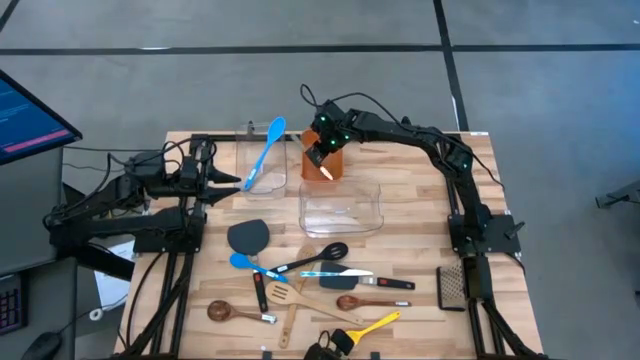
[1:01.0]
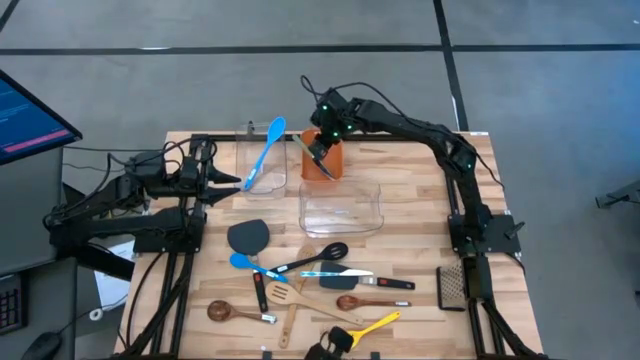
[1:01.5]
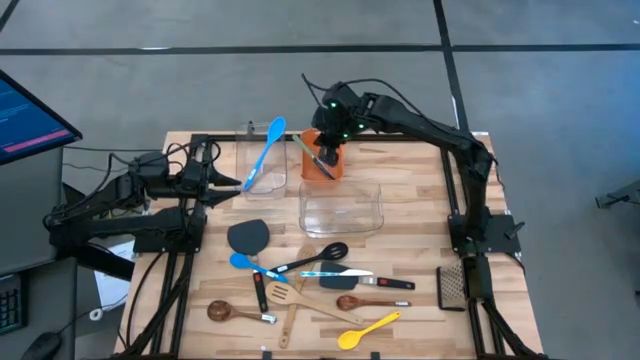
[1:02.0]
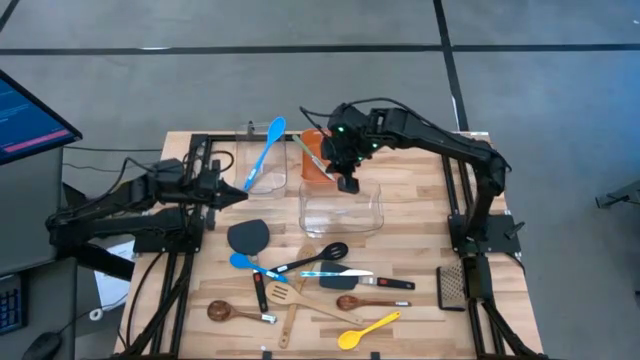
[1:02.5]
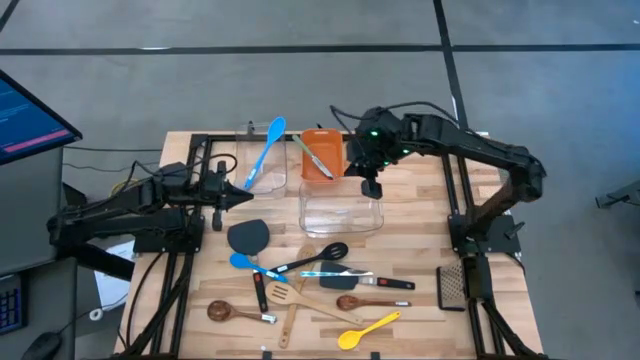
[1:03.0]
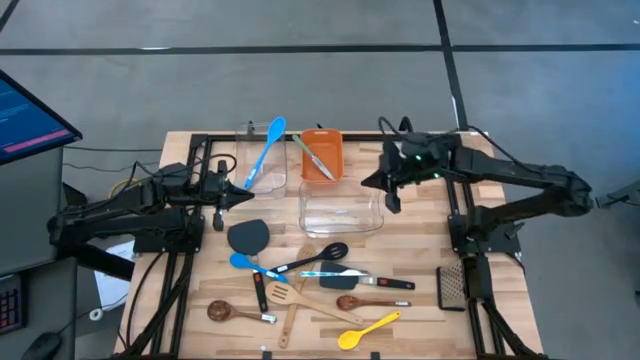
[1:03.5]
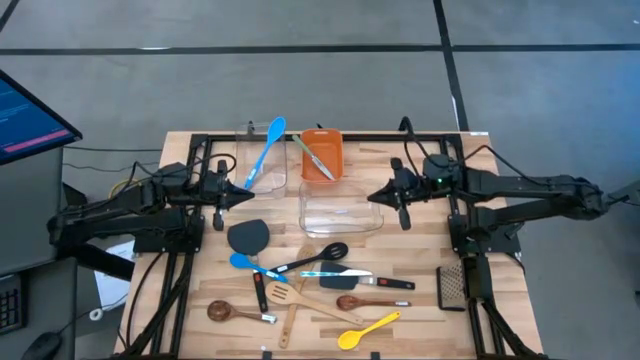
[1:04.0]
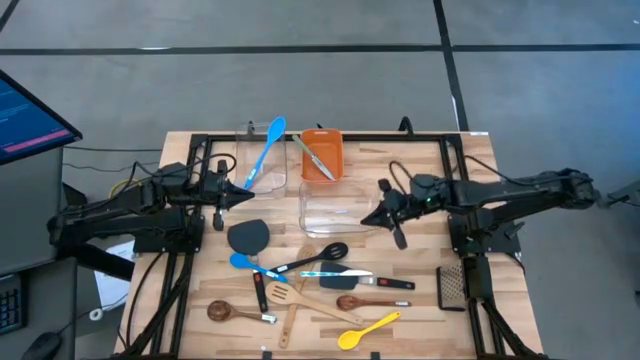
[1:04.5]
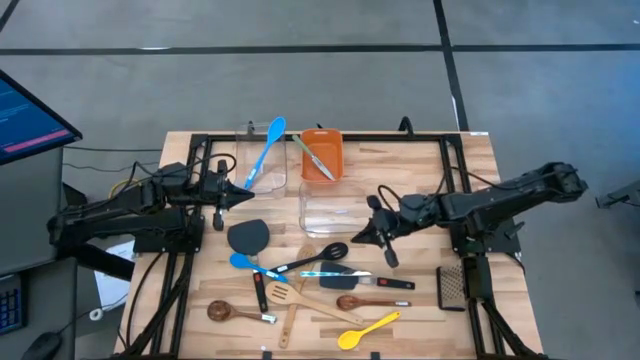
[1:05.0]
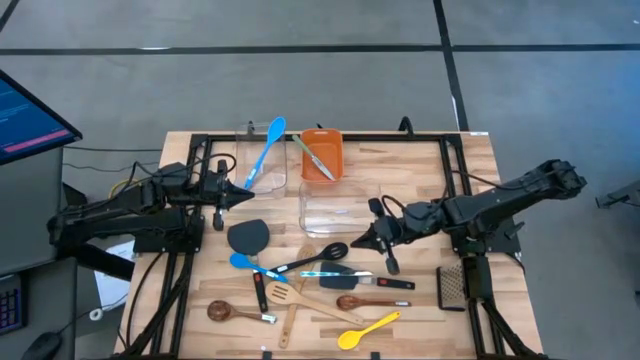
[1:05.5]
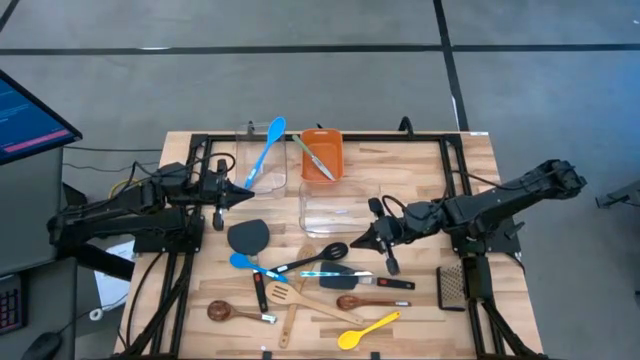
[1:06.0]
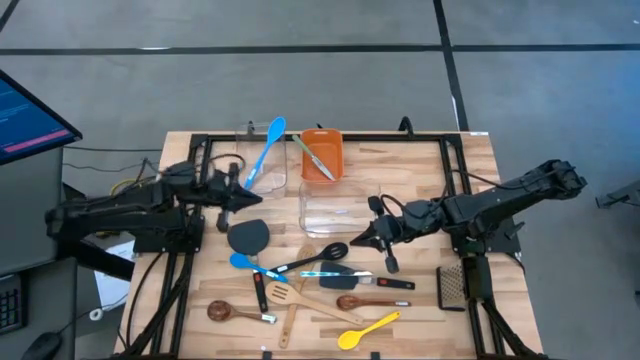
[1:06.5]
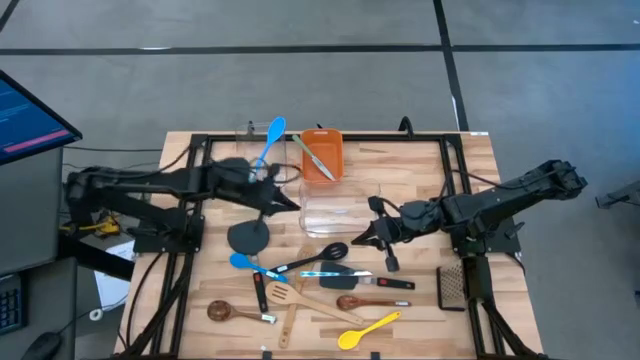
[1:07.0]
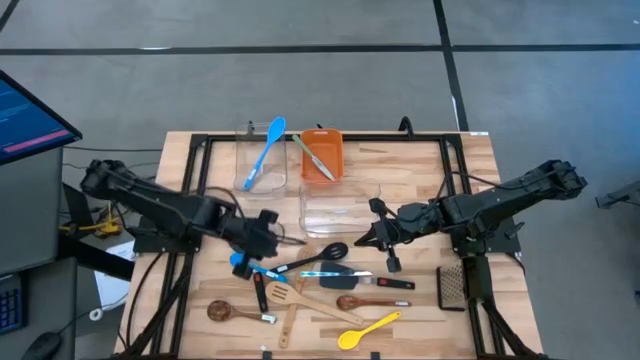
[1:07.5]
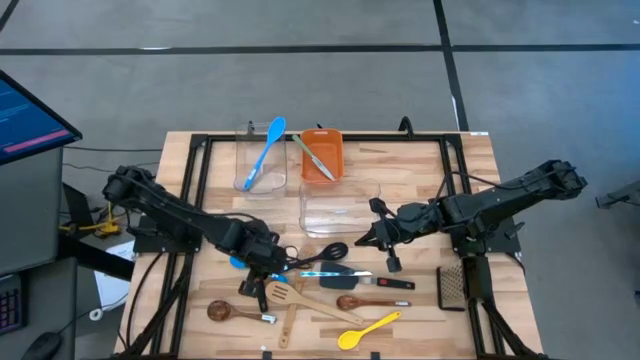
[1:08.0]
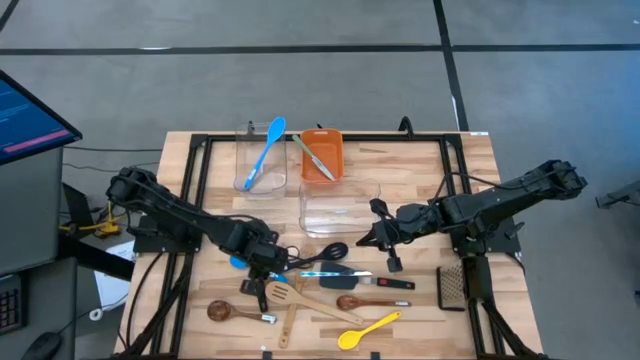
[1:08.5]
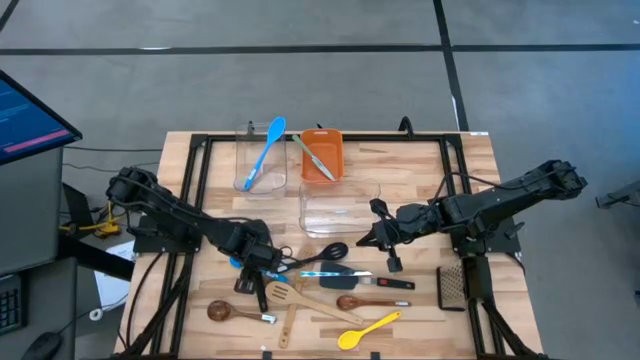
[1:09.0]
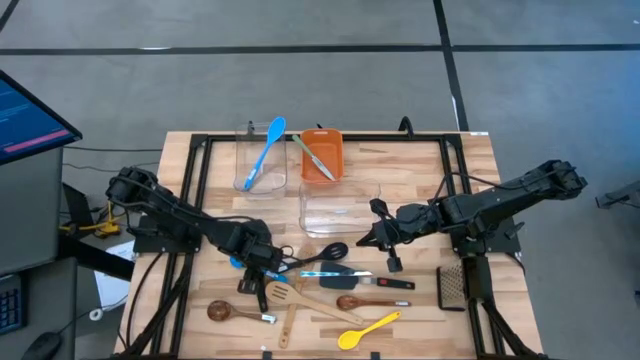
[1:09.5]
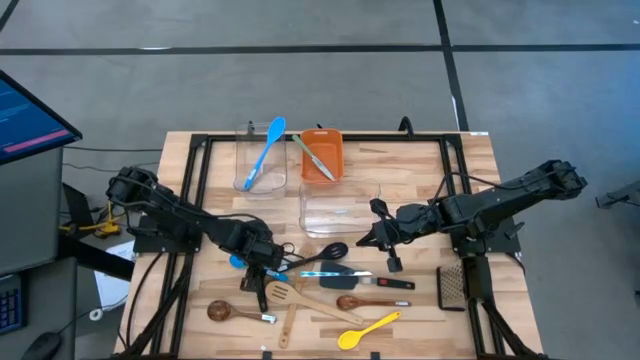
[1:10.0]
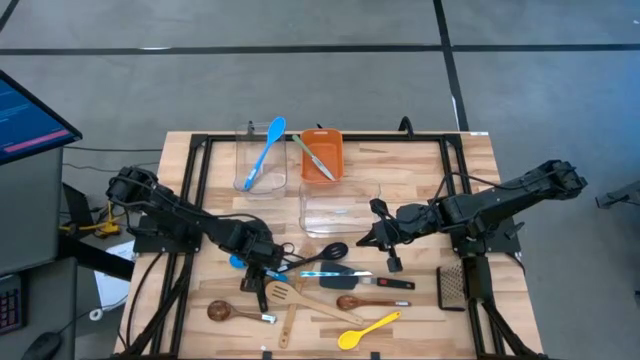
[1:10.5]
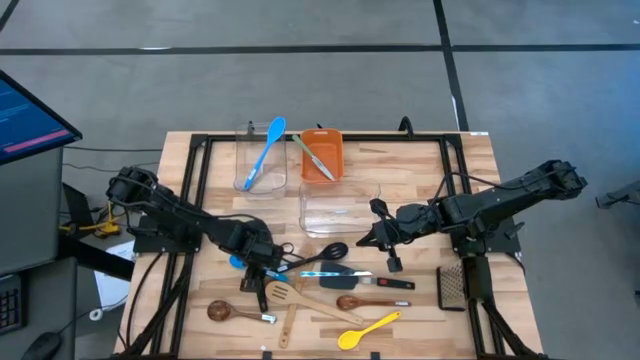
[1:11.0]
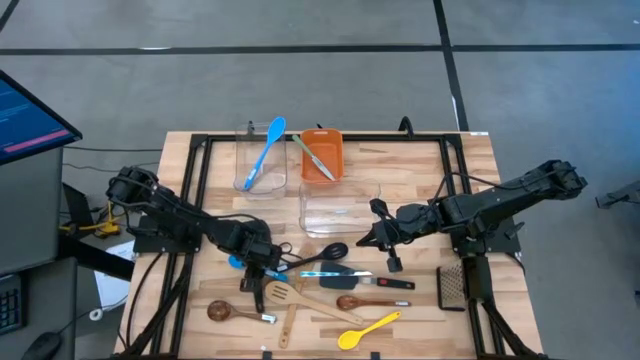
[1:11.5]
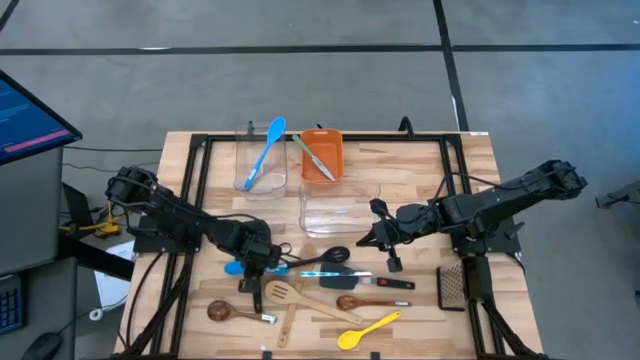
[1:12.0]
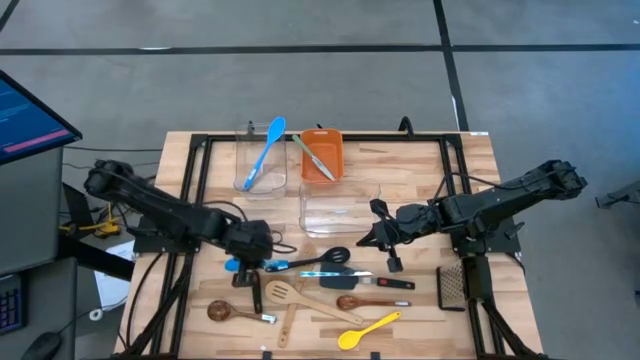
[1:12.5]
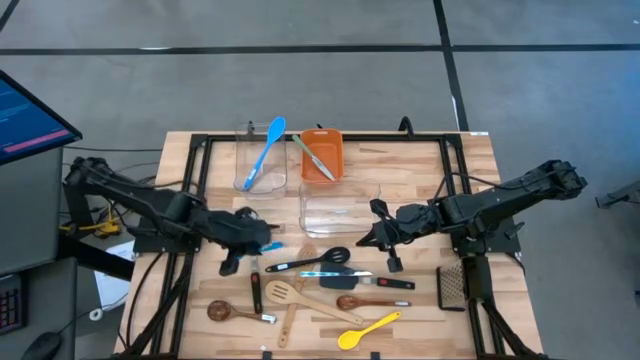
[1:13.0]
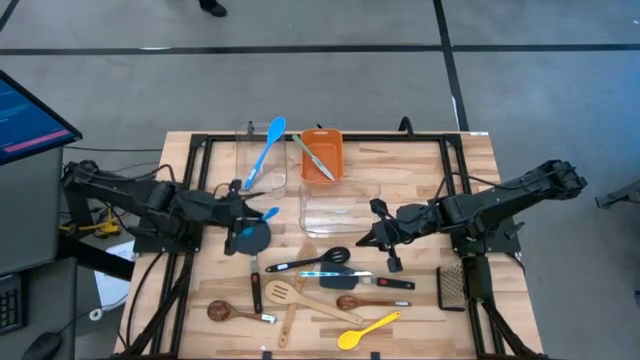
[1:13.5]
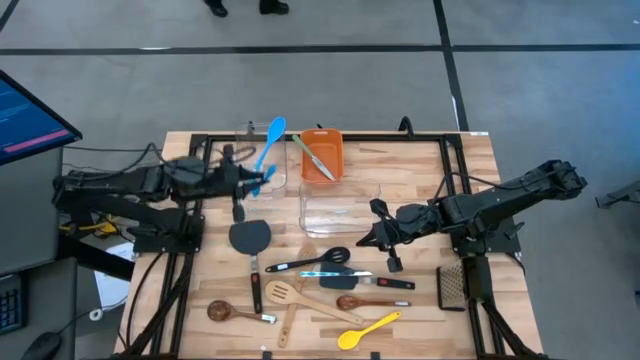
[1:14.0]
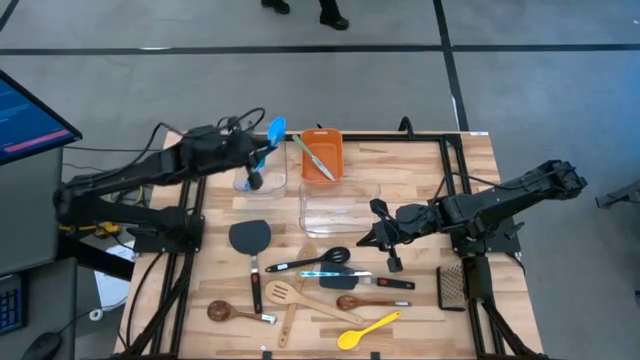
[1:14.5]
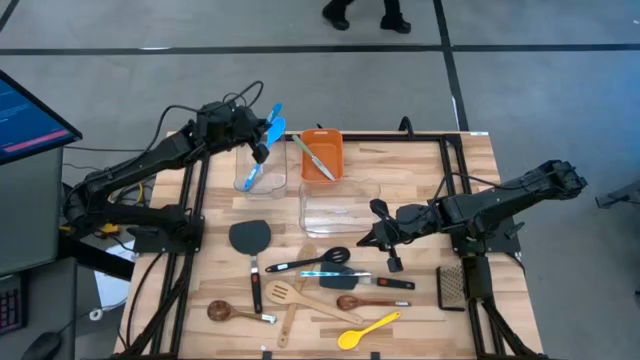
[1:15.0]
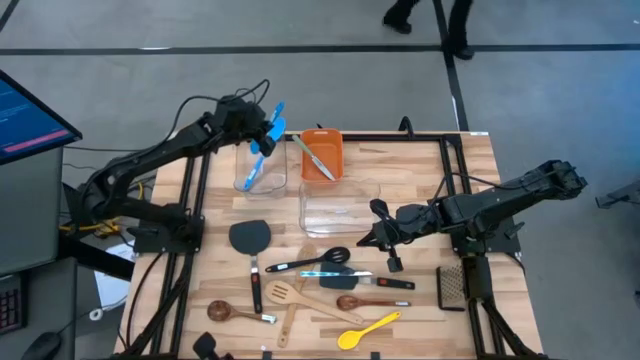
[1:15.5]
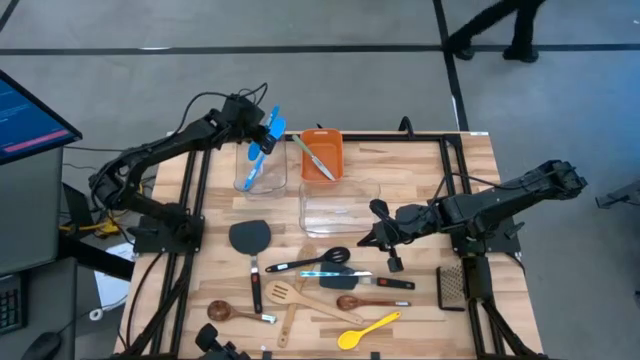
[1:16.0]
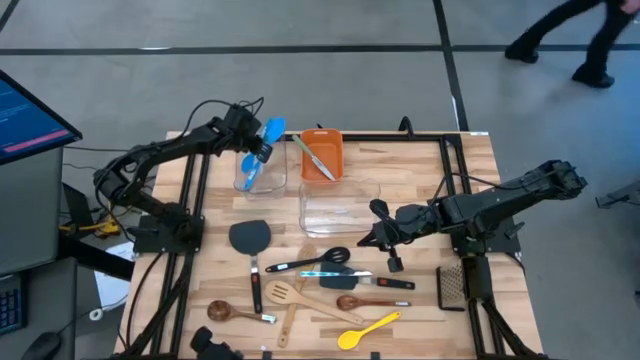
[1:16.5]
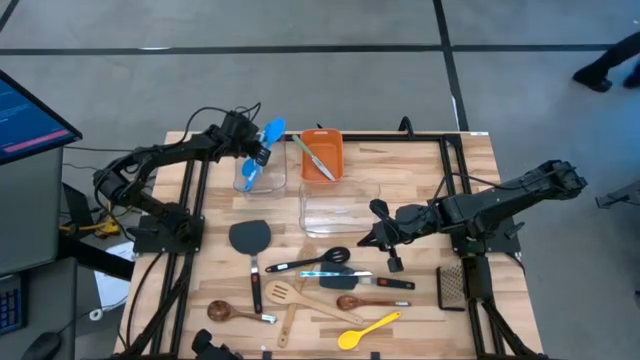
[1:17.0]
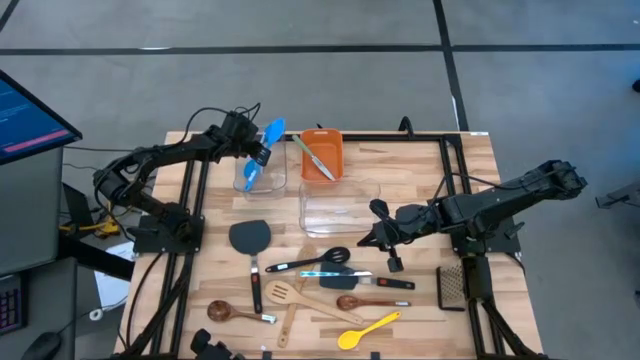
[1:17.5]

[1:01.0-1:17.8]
Task: Pick & Place Kitchen Items
Put the blue serving spoon into the top transparent bin

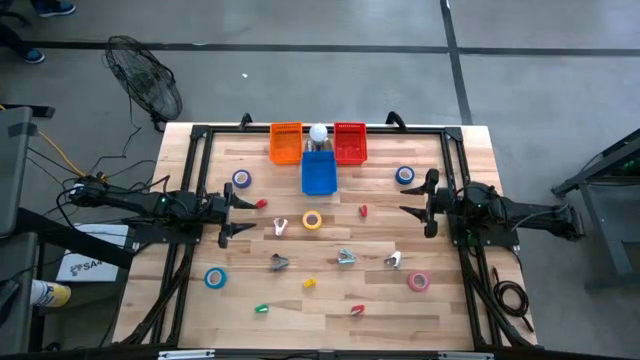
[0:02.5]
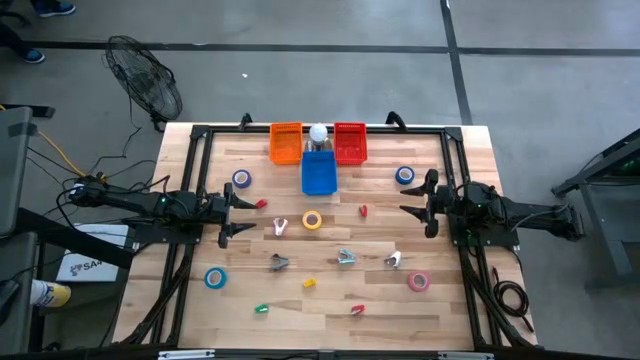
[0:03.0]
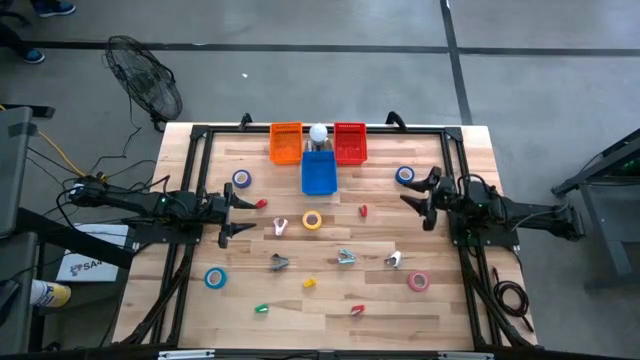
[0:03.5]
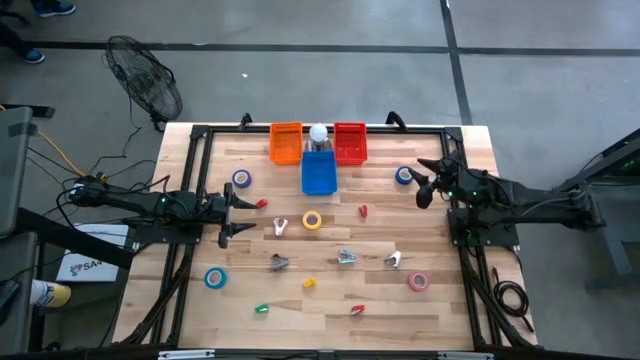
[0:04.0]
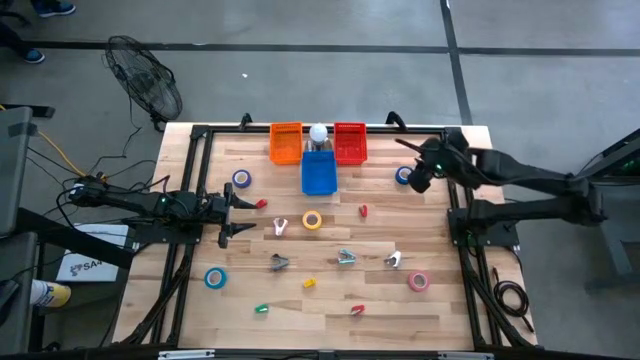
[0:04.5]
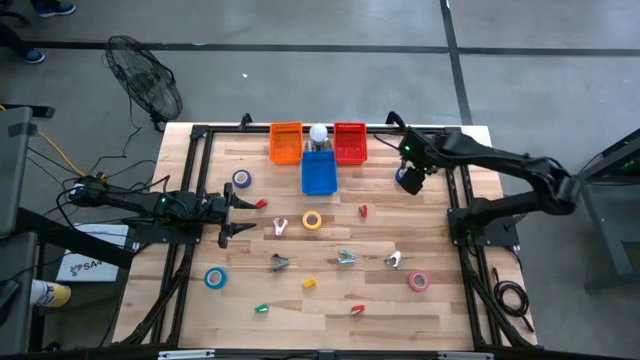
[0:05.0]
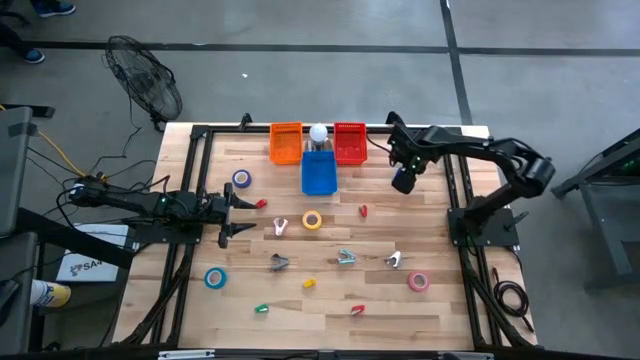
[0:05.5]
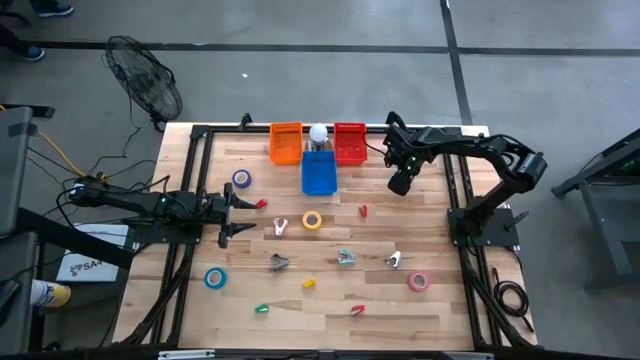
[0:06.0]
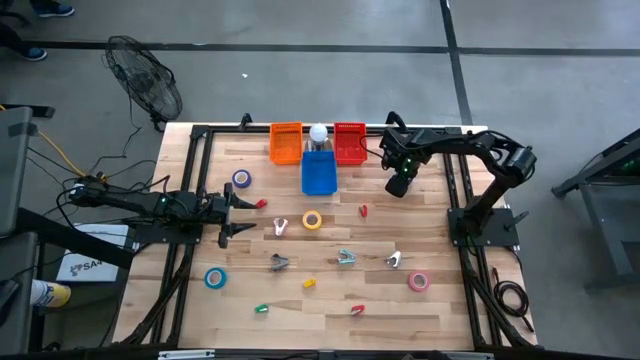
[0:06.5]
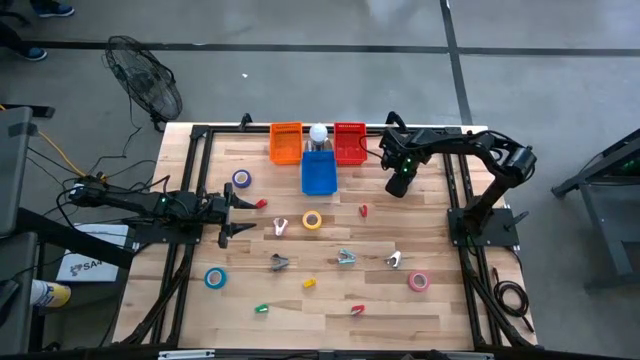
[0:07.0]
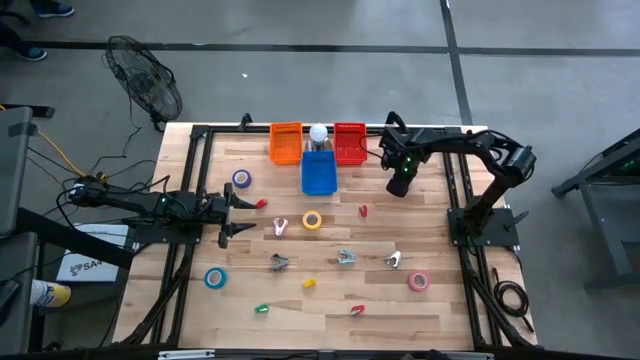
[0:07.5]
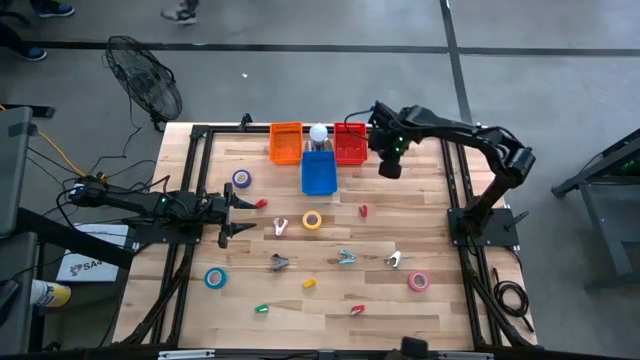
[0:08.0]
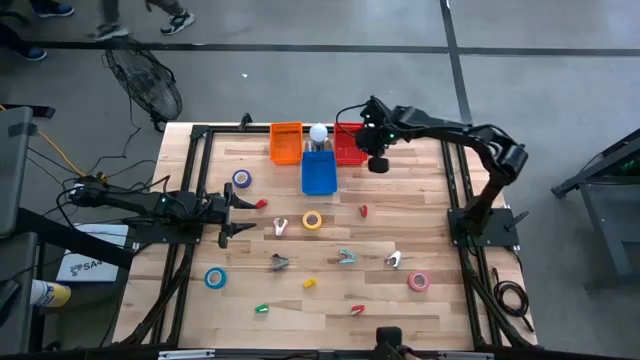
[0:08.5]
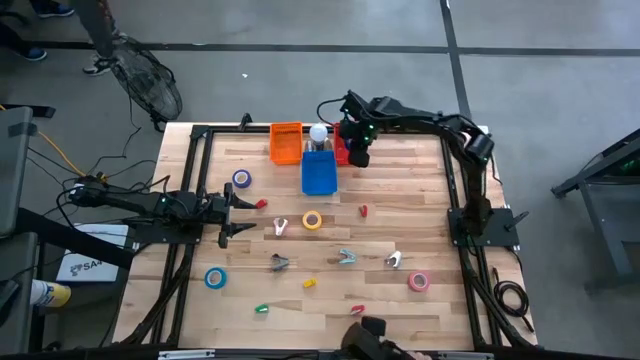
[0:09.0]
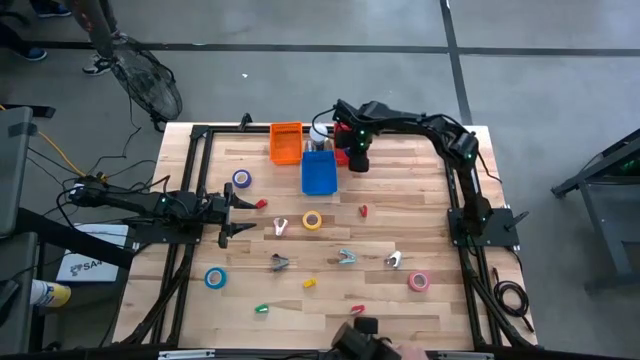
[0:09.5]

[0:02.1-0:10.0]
Task: Pick and place Stapler, Stapler remover, tape
Put the blue tape into the red basket
